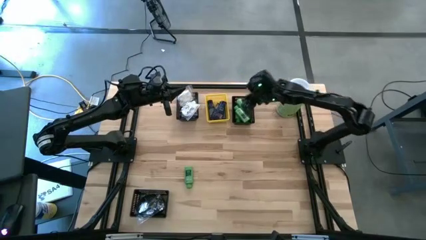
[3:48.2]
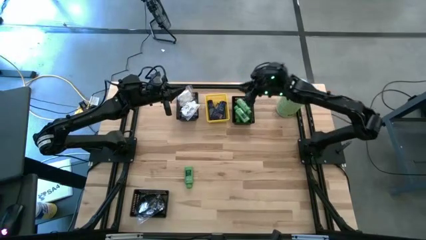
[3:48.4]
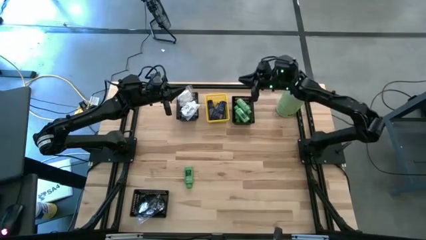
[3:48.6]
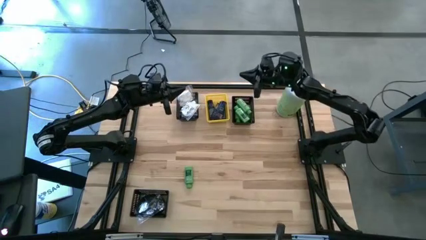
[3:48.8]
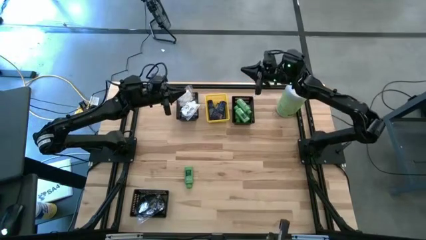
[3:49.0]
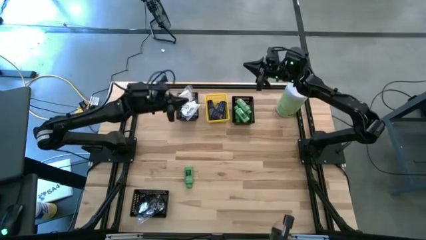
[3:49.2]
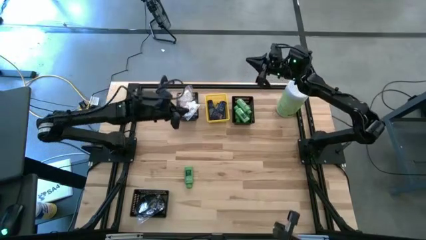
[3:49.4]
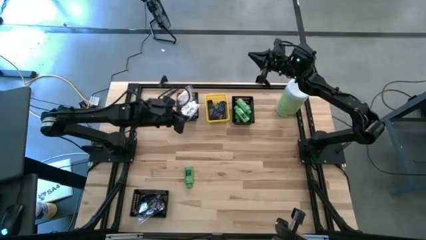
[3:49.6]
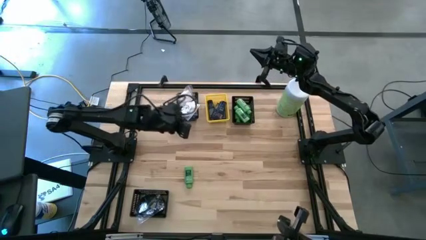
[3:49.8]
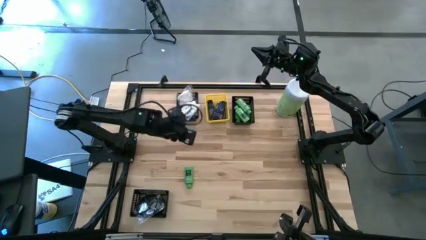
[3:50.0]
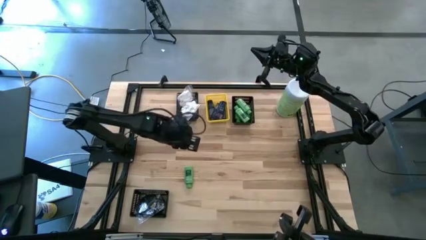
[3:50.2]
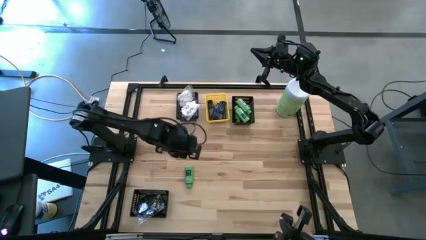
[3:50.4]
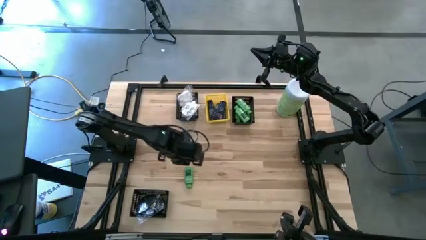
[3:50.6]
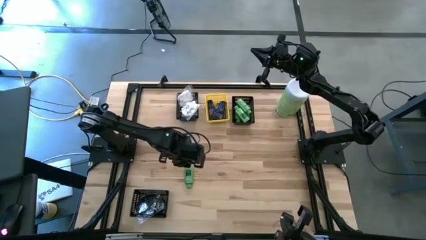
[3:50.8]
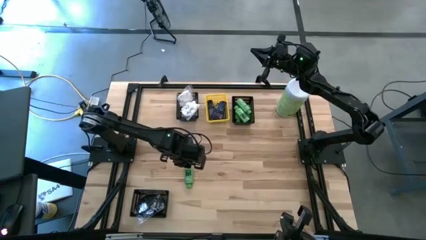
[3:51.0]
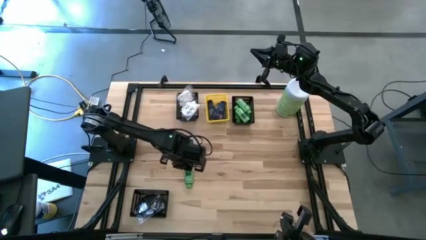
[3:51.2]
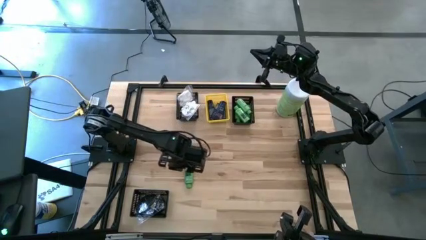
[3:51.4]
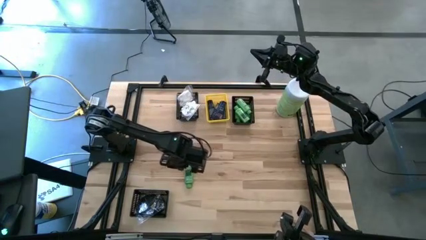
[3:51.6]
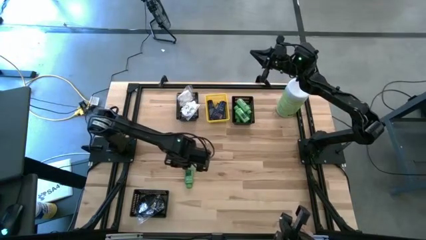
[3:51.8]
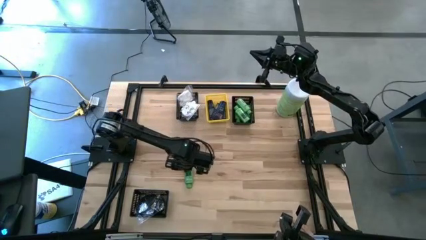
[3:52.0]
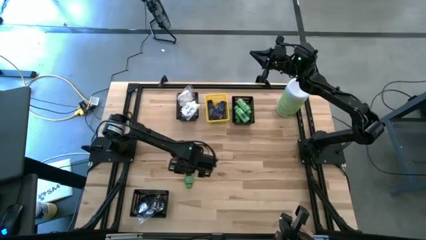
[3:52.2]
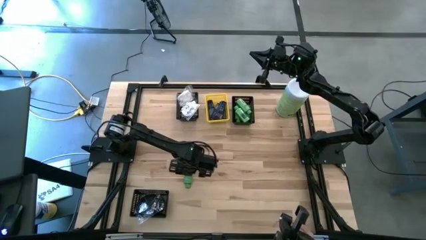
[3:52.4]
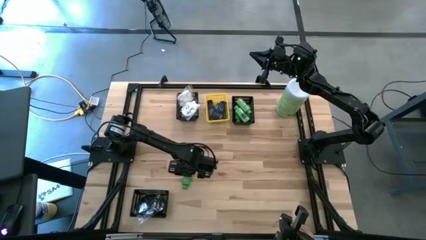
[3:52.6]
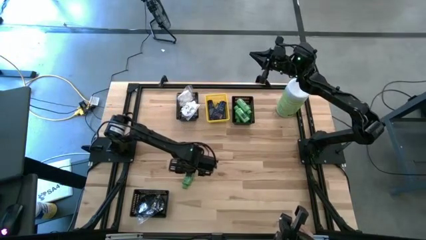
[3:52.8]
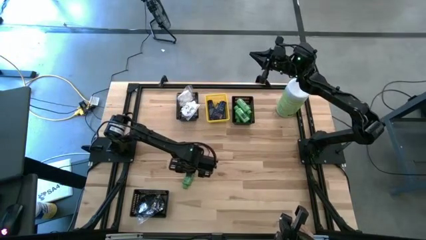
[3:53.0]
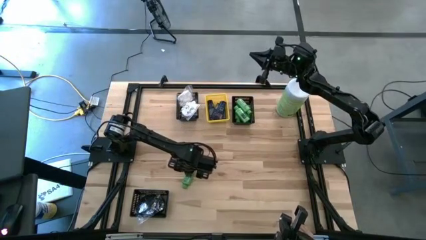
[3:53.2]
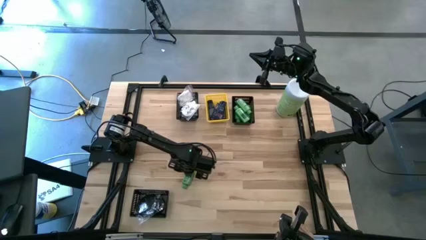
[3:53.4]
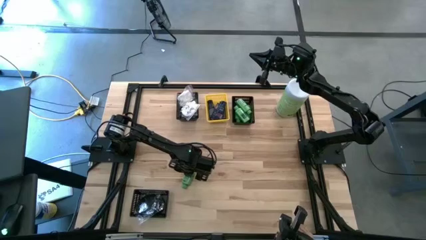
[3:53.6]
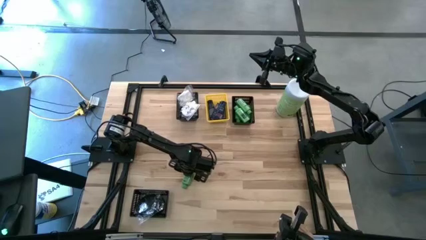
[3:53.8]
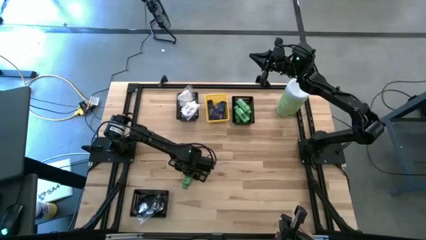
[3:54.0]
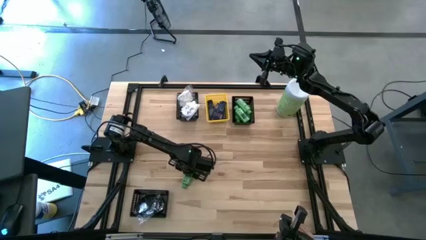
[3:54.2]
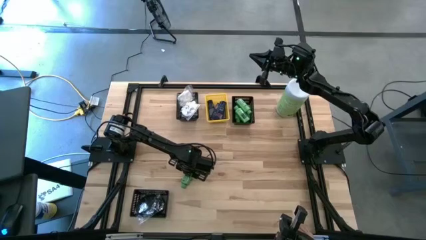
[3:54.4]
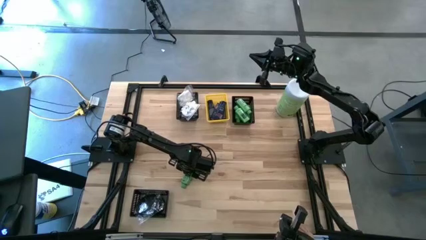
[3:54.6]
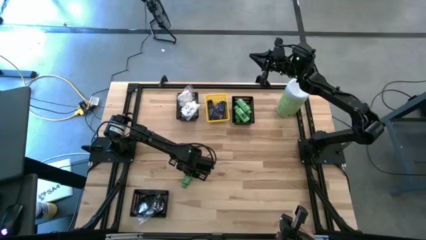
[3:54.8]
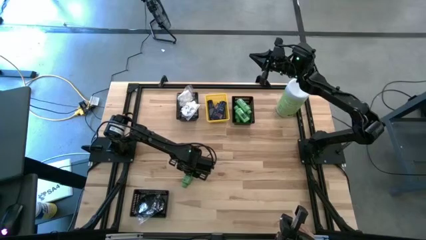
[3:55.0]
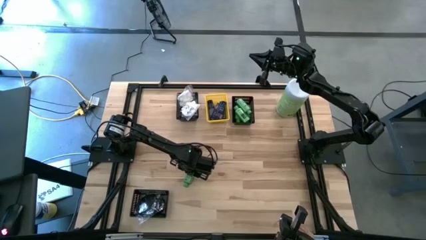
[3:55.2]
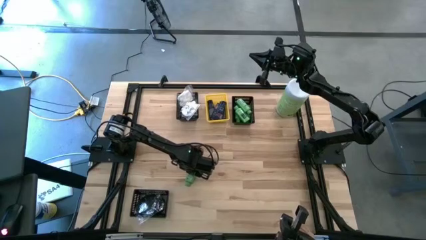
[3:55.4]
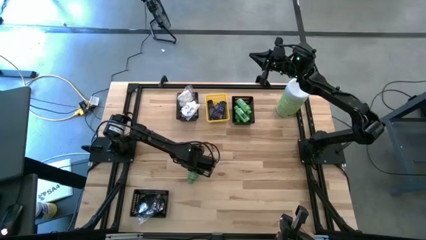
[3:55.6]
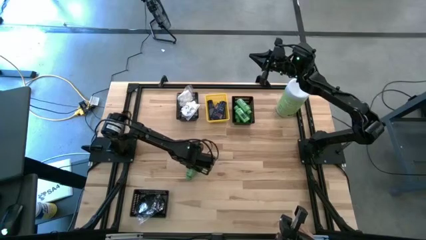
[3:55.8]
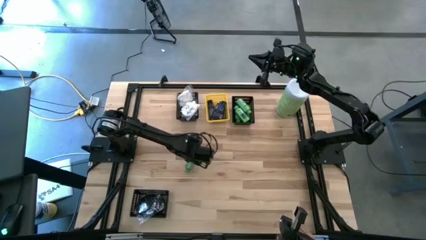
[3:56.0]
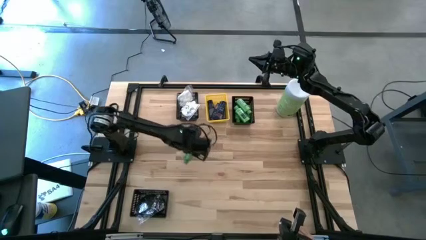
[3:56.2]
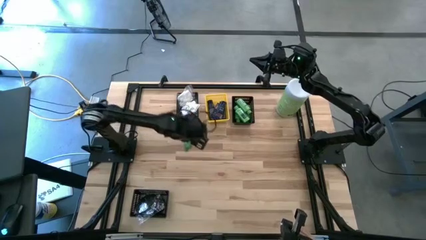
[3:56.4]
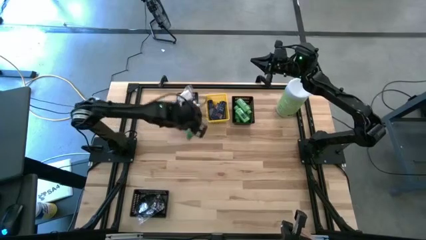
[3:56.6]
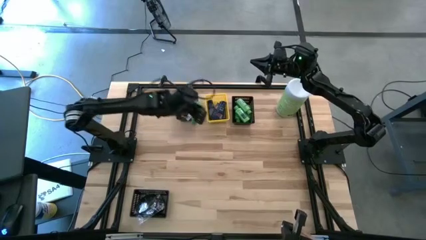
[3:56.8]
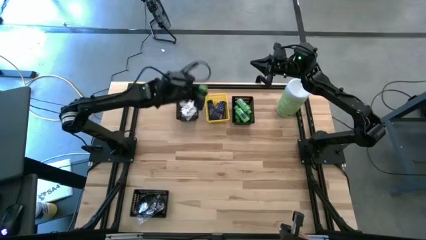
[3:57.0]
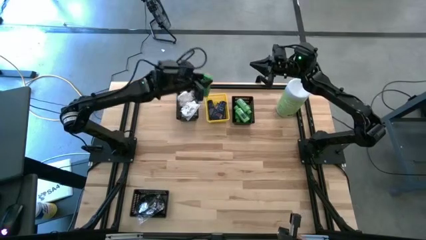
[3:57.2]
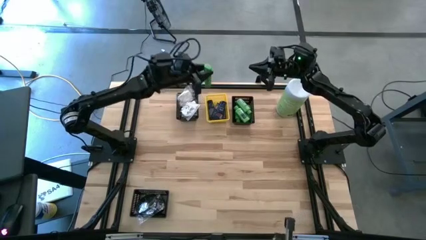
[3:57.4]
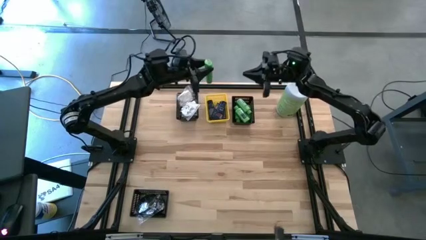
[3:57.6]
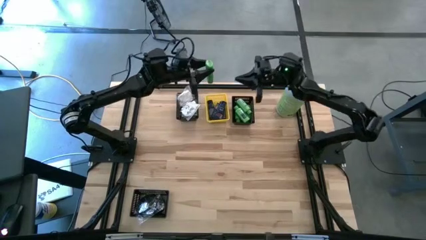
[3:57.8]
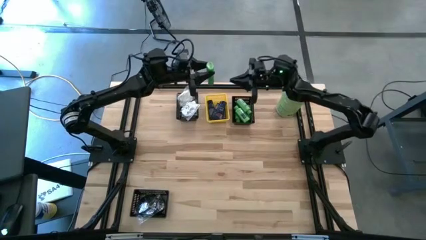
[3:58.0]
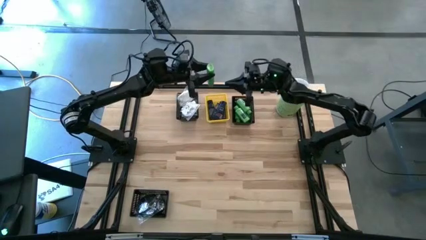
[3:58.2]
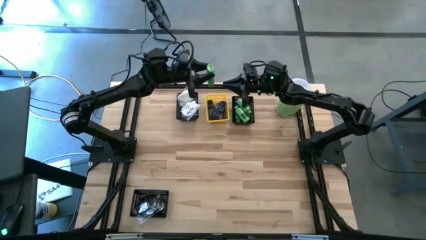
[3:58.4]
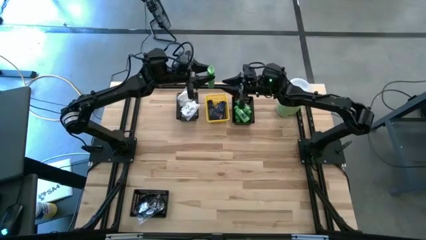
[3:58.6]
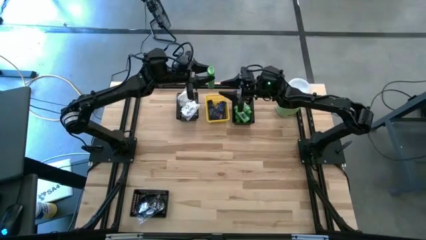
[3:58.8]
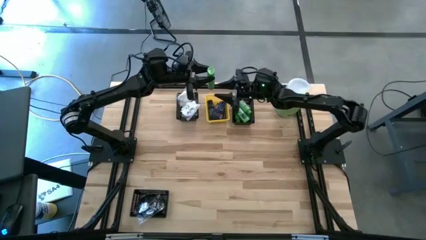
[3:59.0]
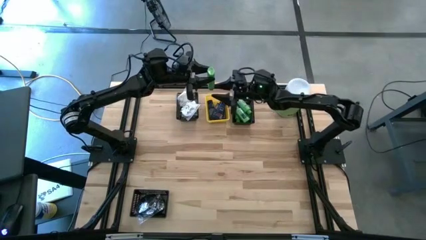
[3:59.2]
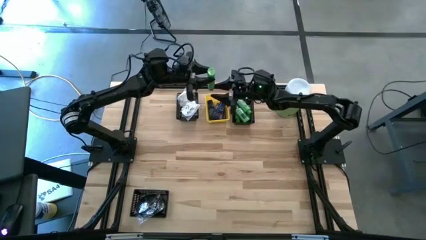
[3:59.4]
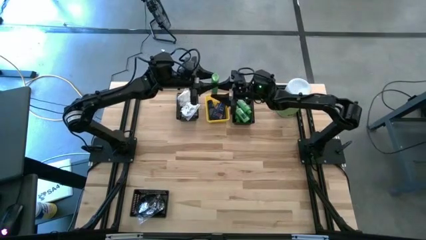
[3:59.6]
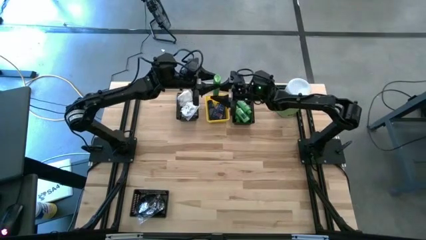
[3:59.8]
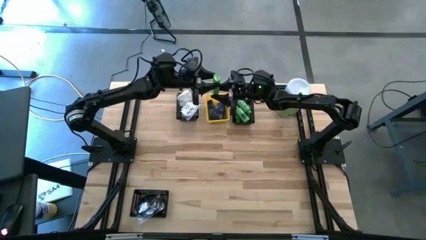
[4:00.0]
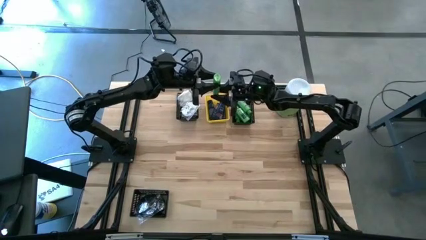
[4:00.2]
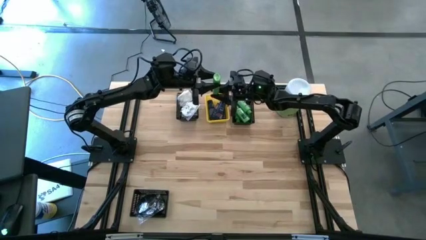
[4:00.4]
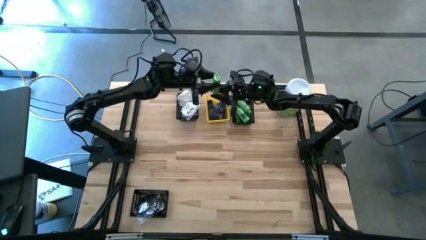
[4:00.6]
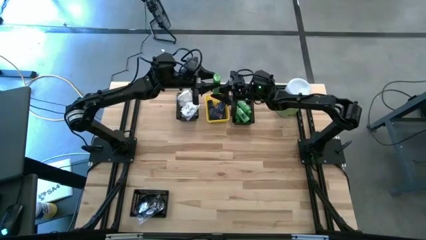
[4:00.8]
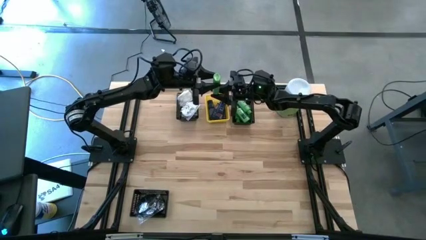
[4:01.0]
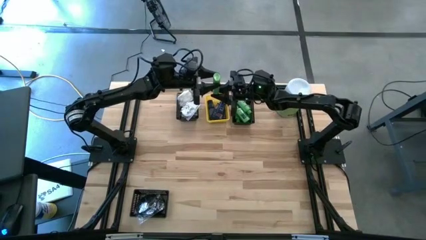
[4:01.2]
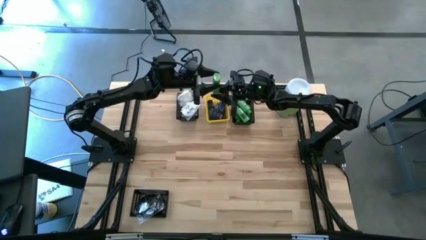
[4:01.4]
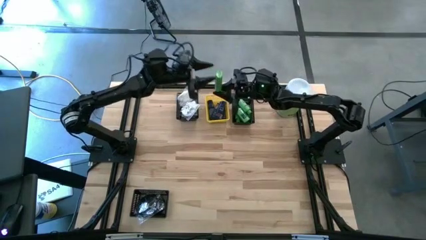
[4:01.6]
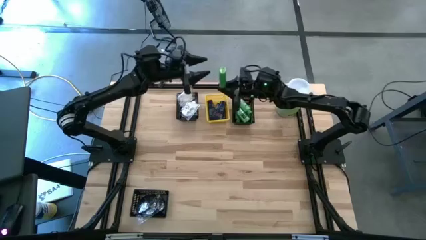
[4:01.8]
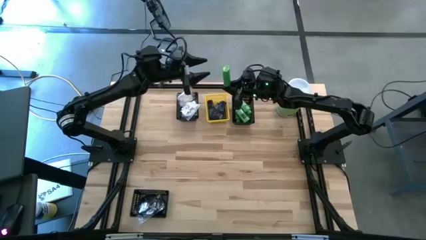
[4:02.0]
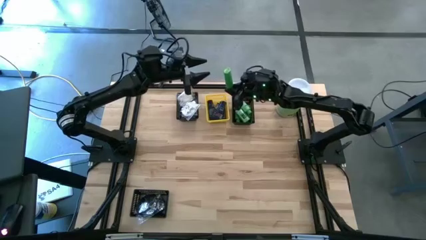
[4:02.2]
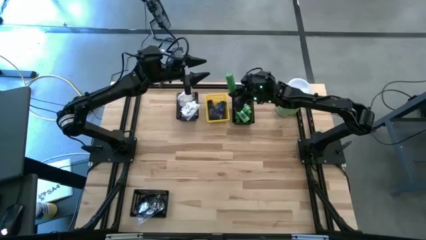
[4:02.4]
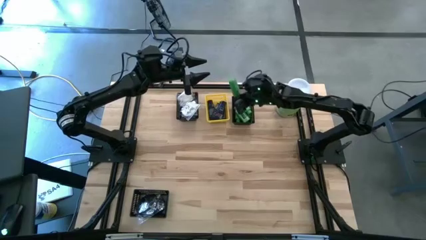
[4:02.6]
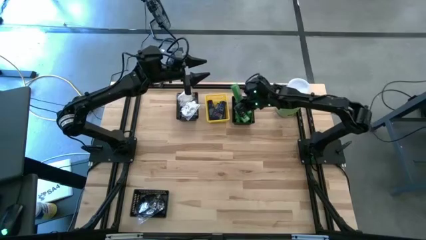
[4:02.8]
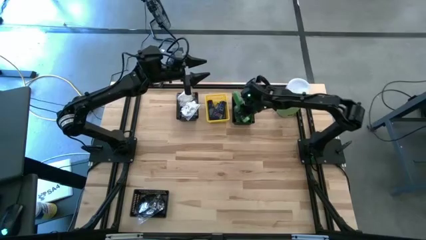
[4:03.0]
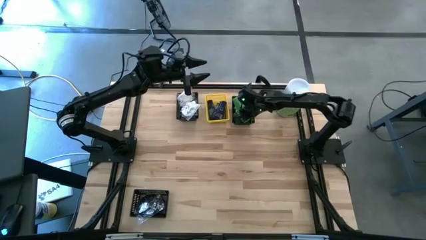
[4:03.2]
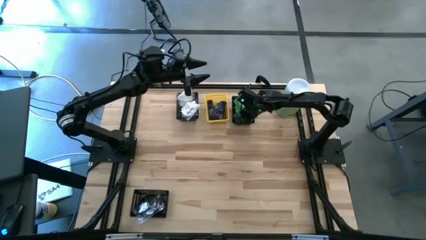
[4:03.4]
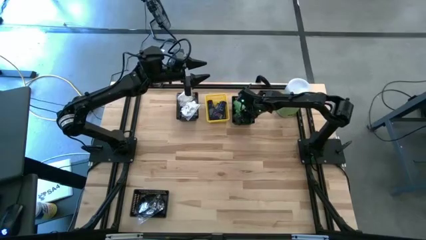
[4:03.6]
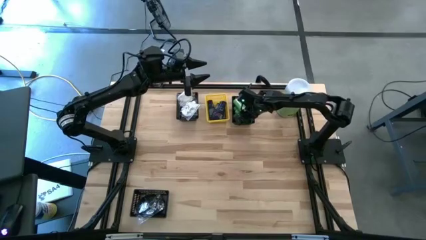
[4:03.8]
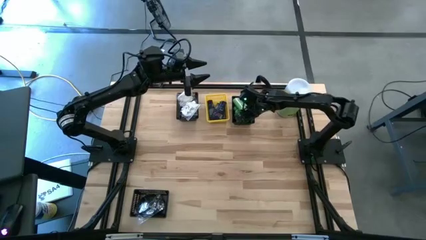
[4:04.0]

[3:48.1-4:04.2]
Task: Pick & Place Travel size toiletries
Put the green shampoo bottle into the top right black bin

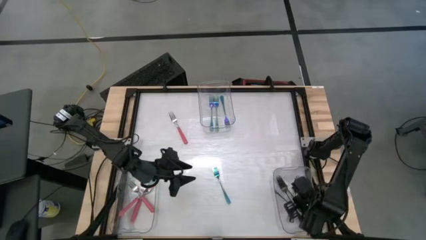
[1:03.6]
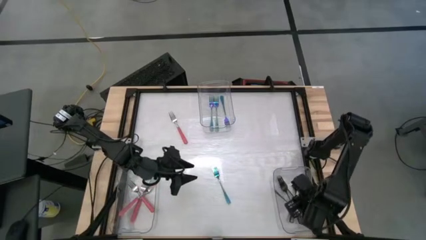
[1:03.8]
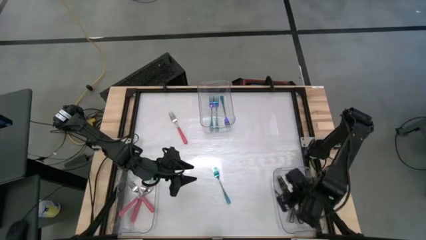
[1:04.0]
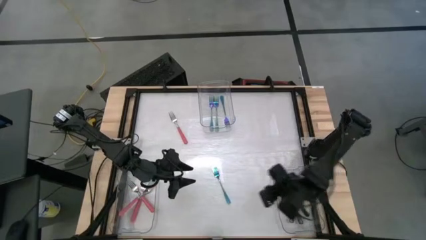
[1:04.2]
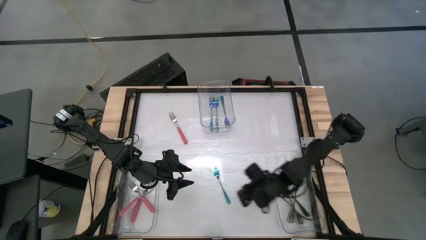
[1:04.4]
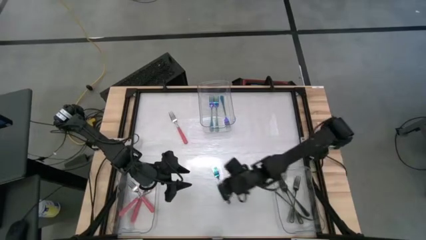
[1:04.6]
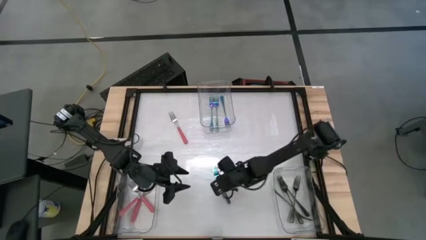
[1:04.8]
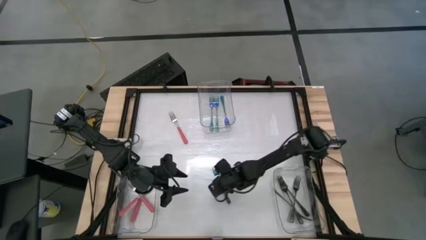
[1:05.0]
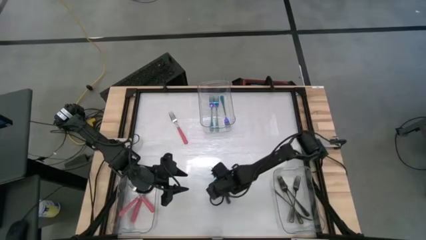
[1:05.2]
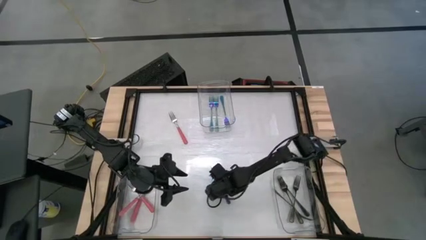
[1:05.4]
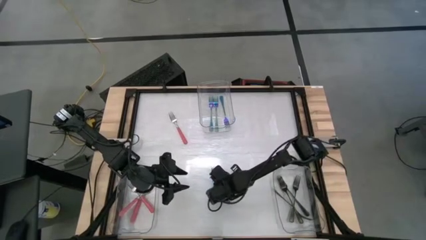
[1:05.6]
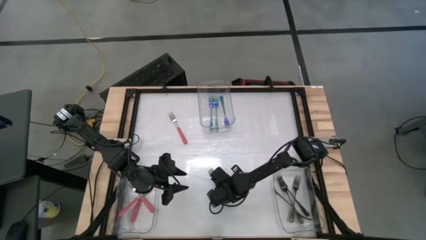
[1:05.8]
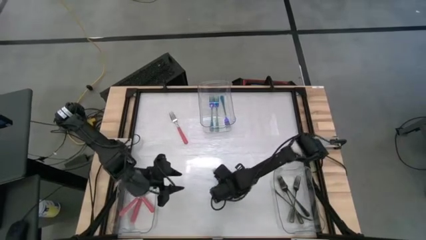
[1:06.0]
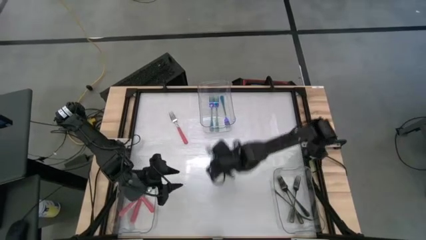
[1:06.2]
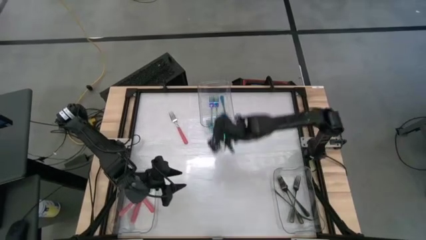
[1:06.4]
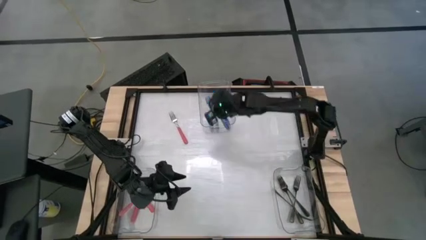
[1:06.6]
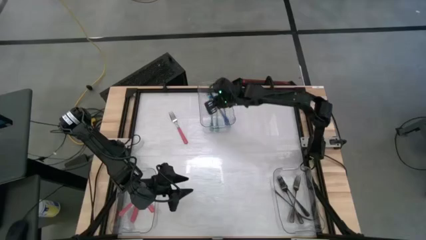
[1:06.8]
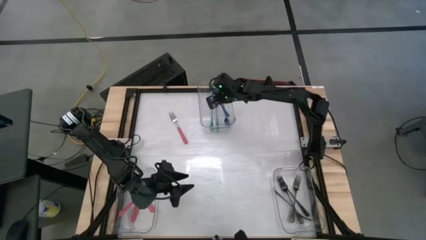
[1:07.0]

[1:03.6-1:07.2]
Task: Sort silverware by color (type)
Put the titanium rainbow fork into the top transparent bin
